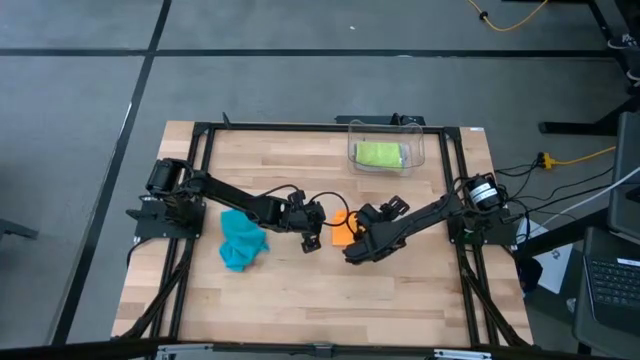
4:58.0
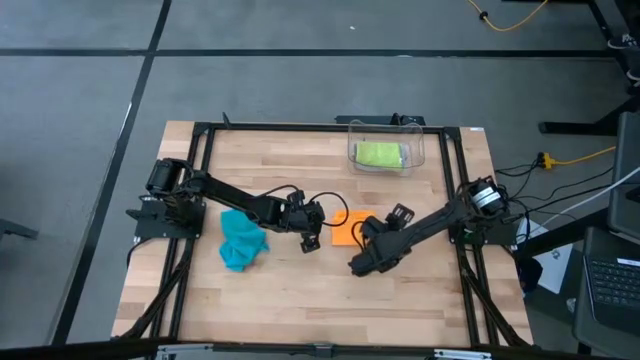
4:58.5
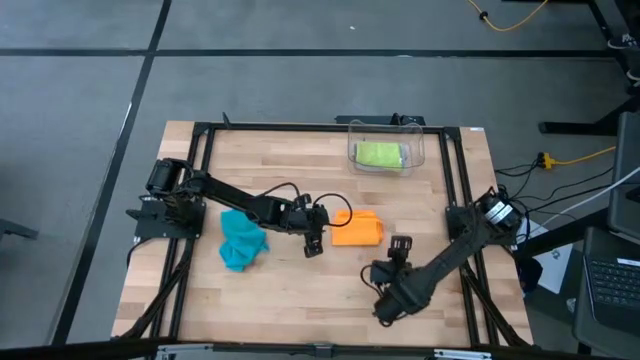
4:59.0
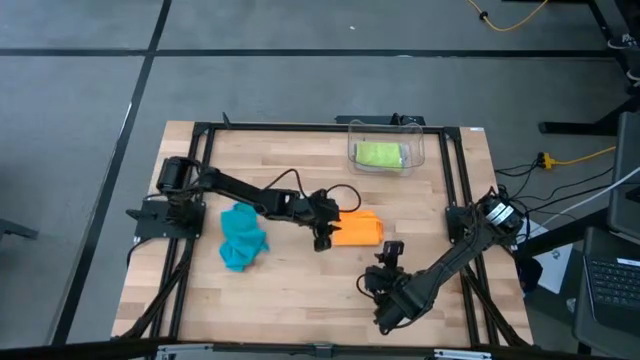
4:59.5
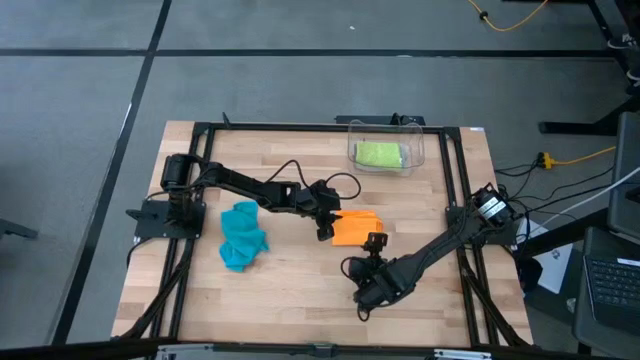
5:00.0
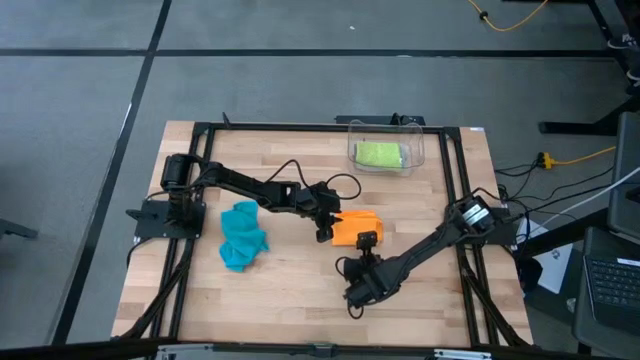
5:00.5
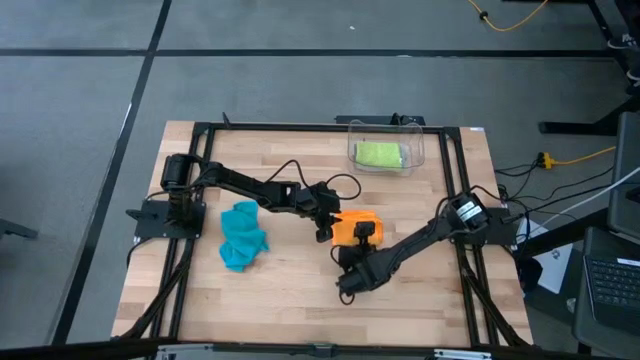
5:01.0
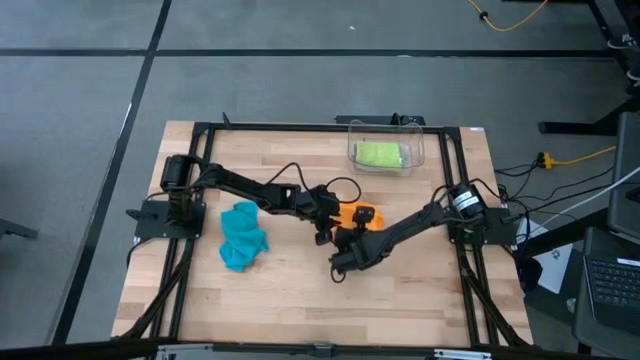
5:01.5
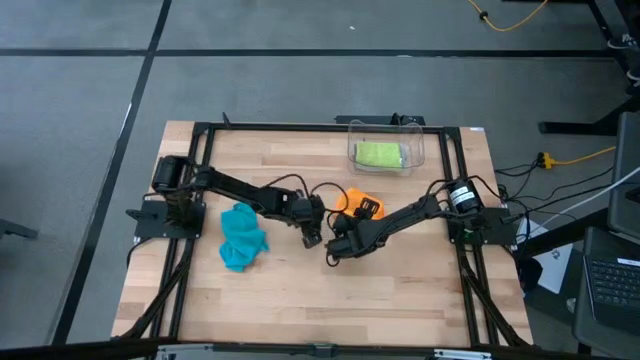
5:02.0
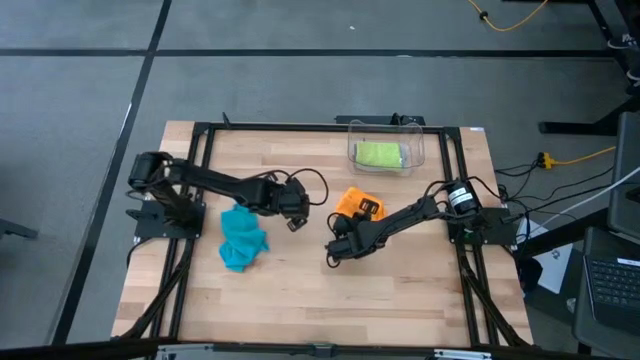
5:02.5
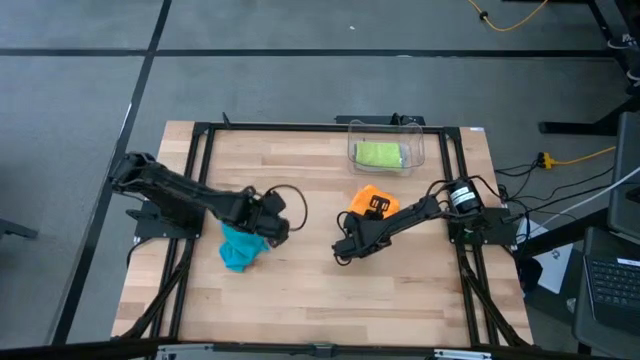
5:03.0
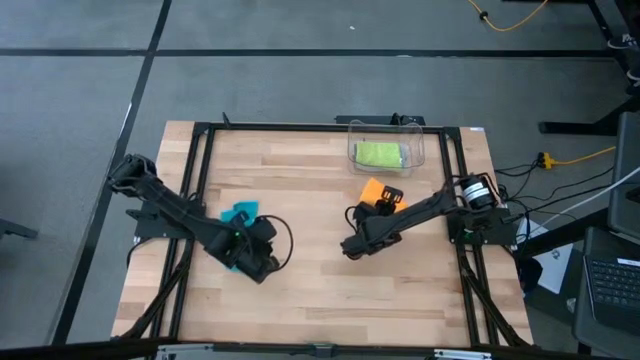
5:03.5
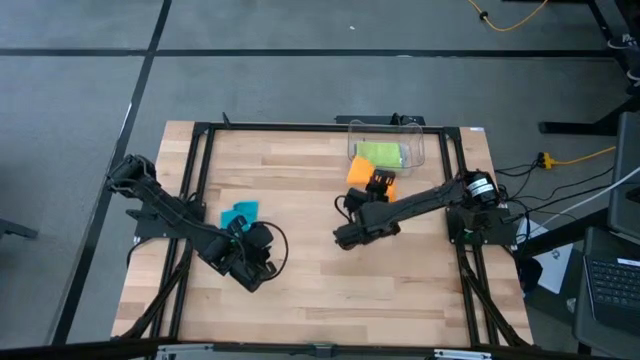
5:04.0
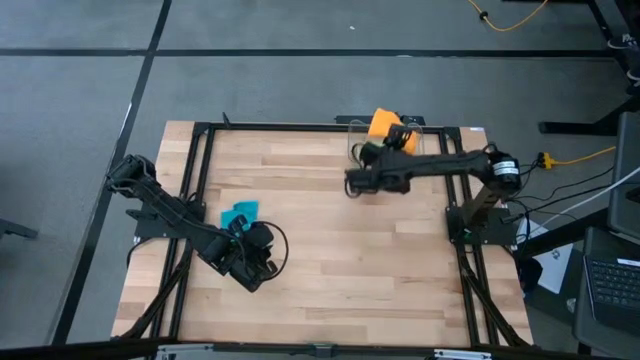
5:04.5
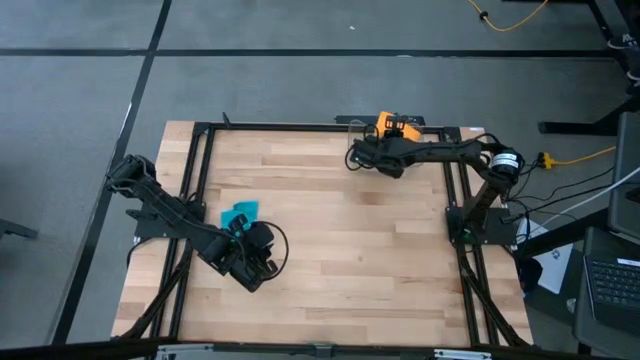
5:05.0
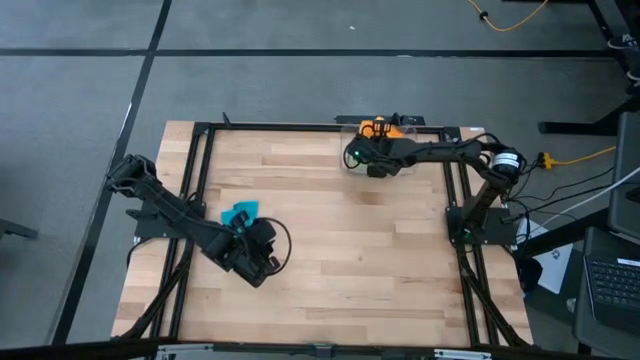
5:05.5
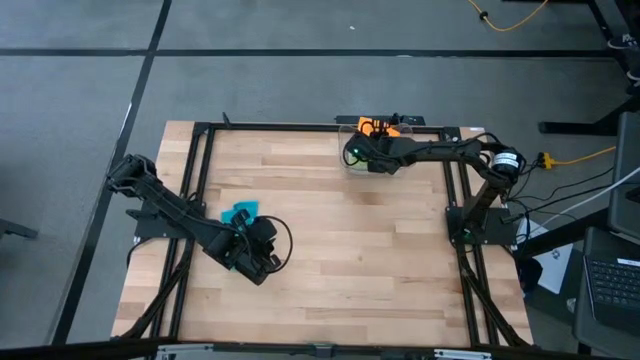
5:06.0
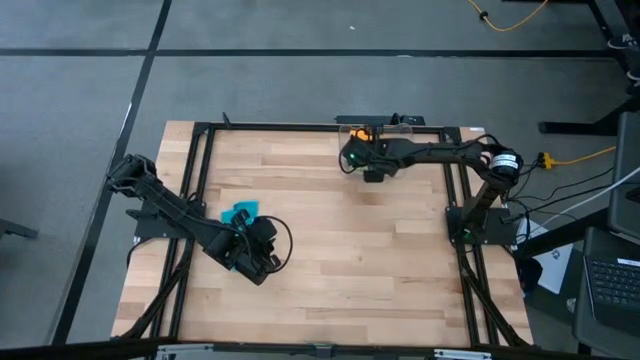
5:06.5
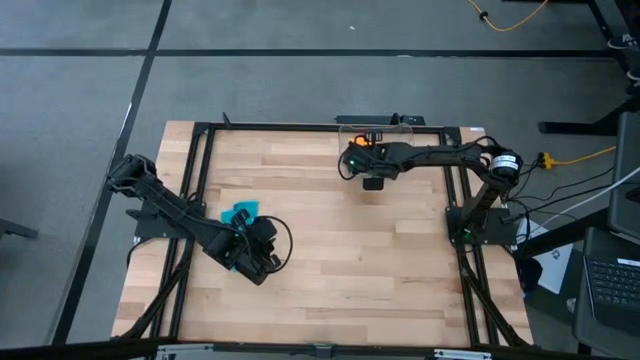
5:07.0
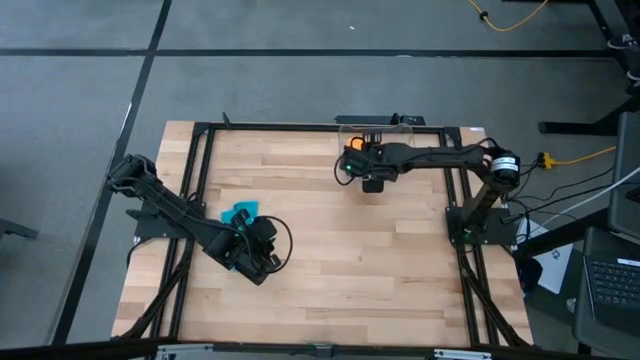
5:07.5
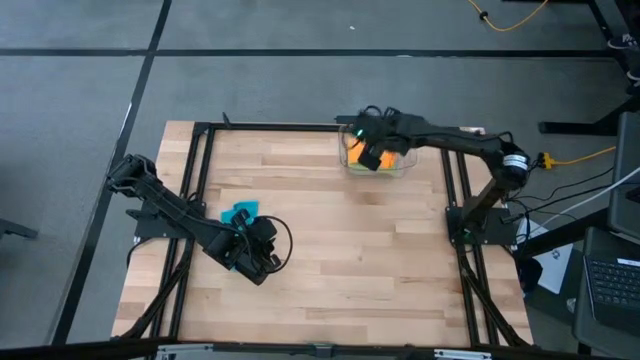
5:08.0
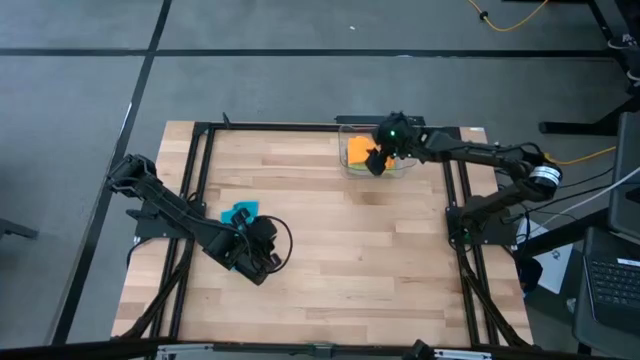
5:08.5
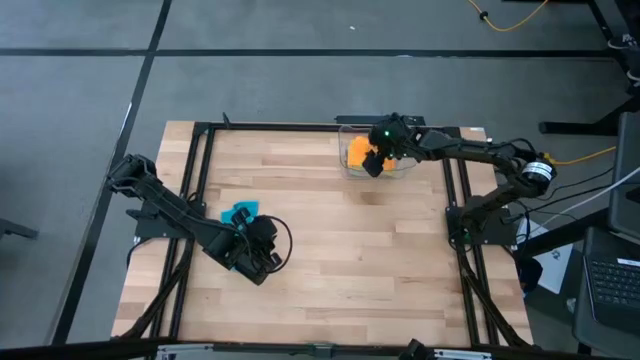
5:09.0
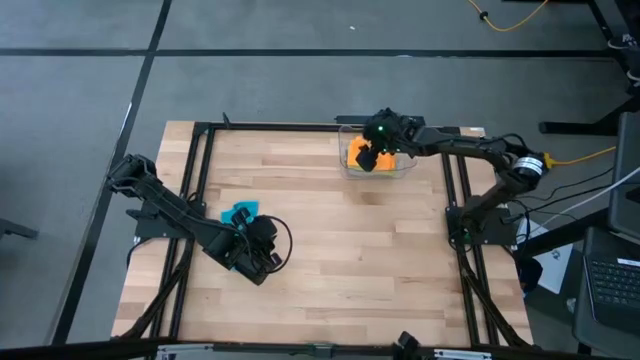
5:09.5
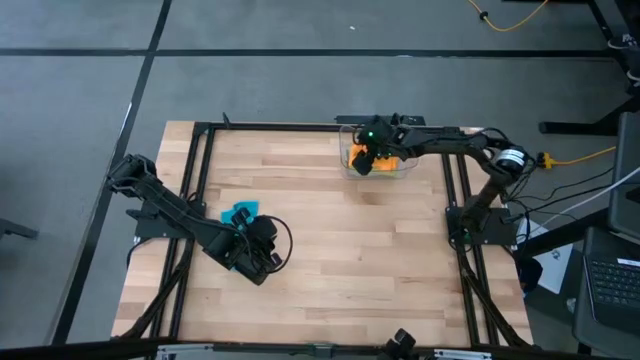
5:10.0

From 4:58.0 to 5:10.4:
Task: Fold microfiber towels
Put the folded orange microfiber into the transparent

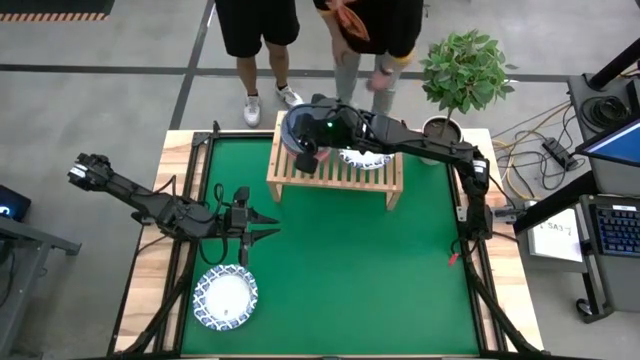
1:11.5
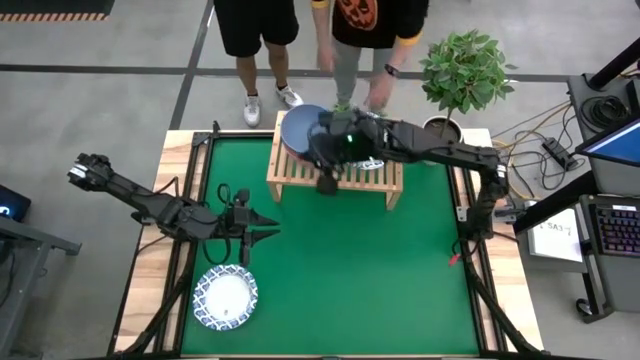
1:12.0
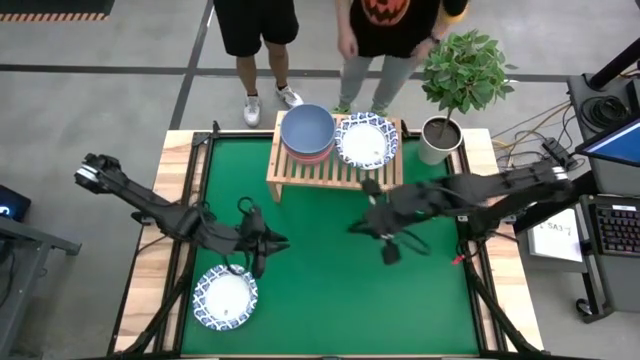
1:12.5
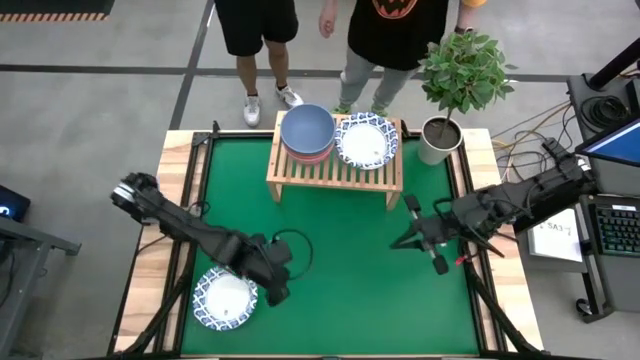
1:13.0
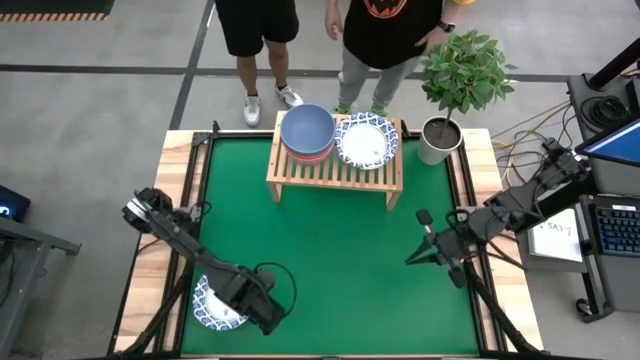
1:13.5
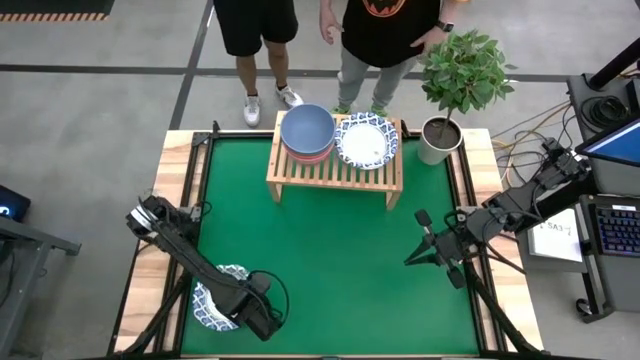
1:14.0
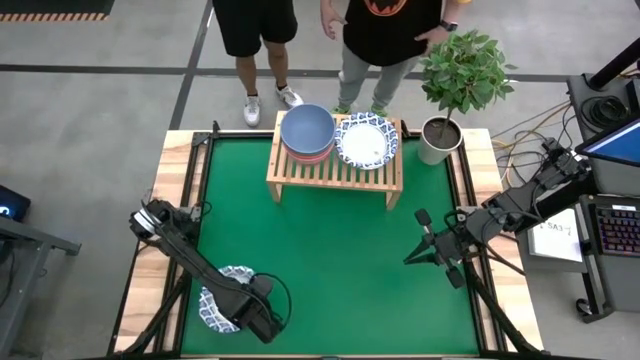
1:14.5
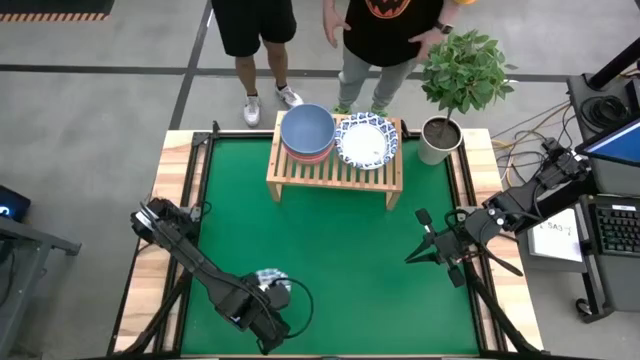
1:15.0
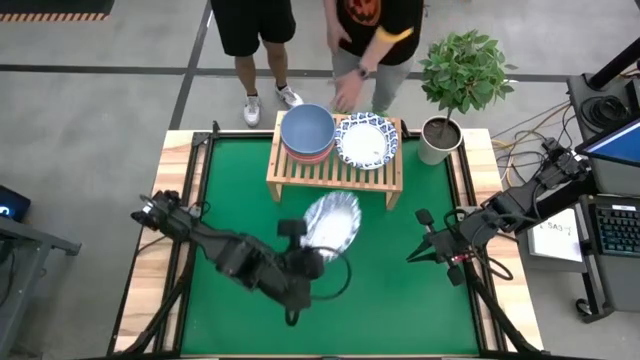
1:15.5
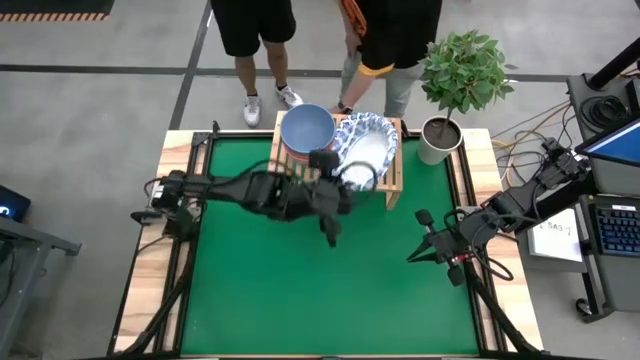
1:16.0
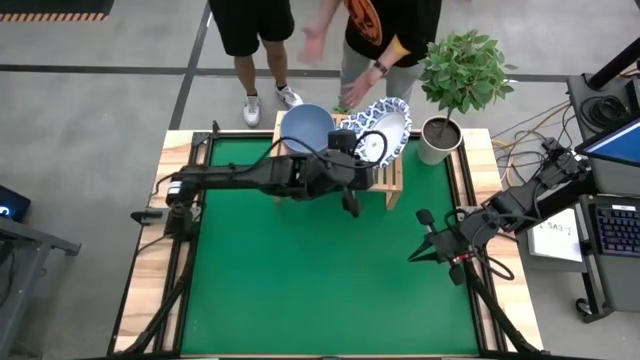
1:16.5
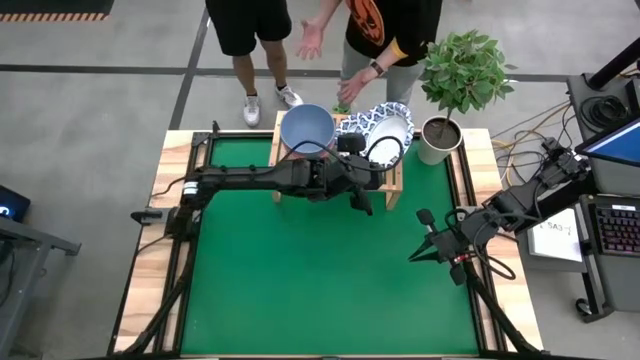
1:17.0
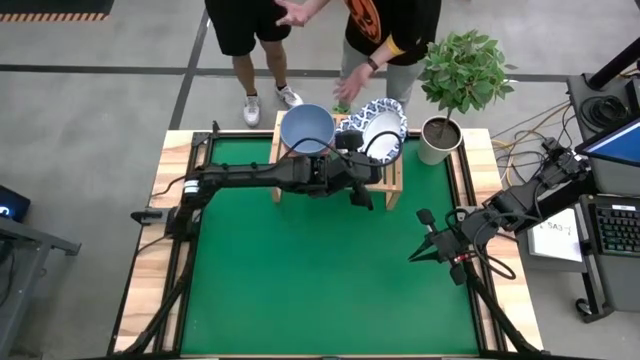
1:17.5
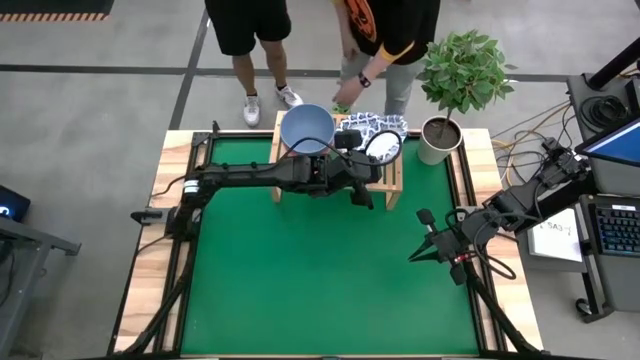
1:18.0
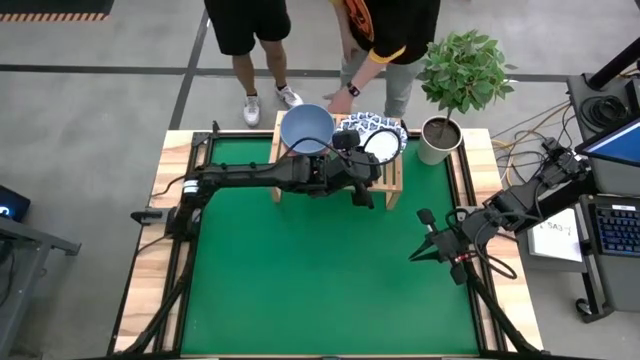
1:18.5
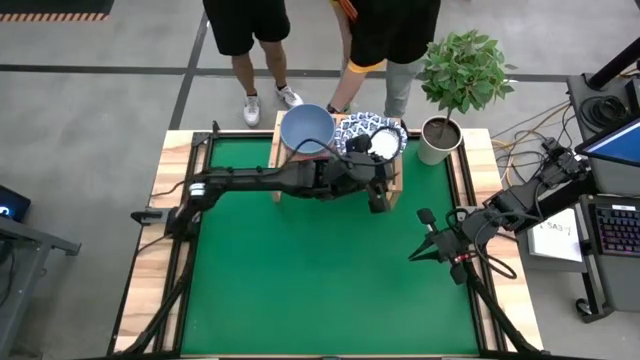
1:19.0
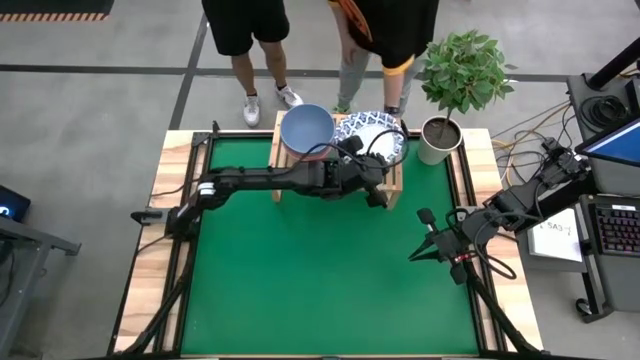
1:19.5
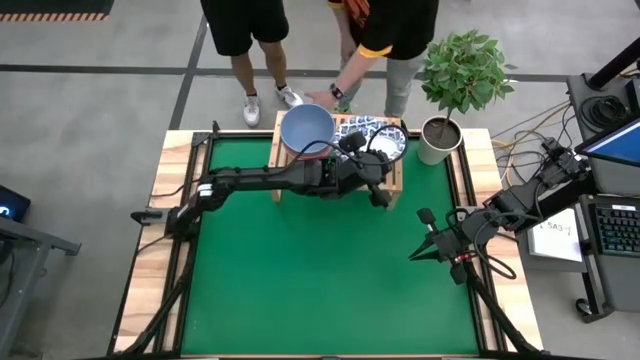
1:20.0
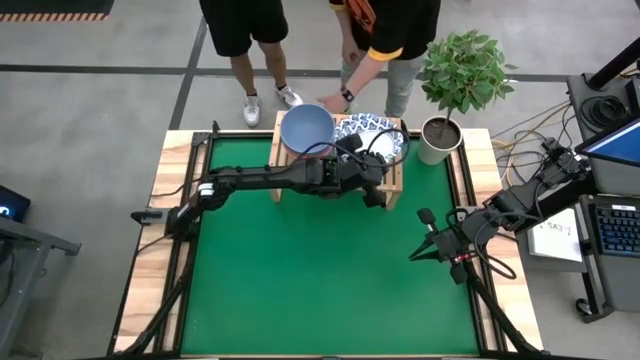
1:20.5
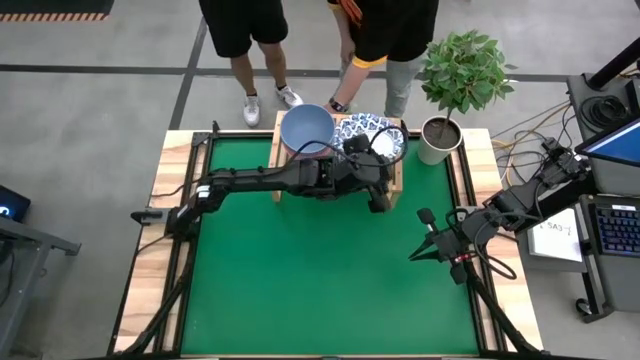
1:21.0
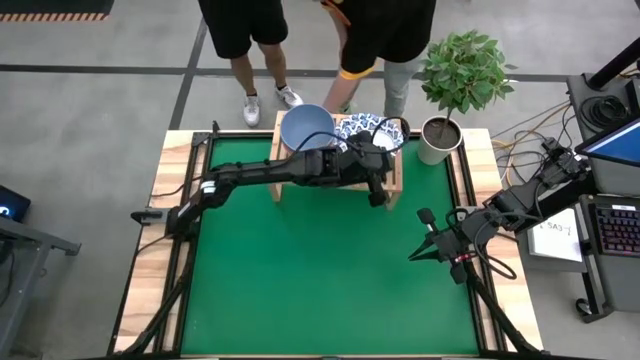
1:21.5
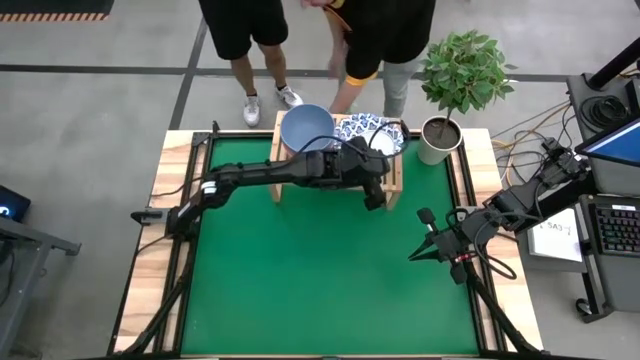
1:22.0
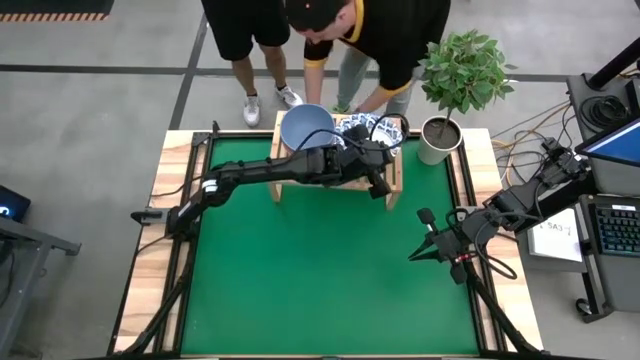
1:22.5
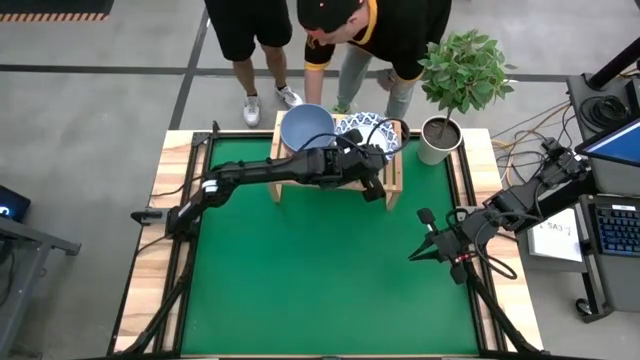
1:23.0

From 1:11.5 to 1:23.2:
Task: Place and stack bowls onto a shelf
Stack the white bowl on top of the white bowls on the shelf
